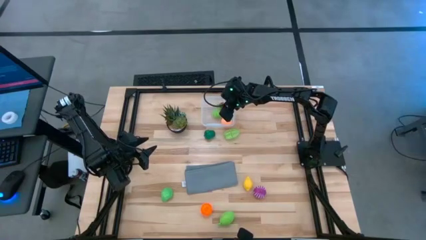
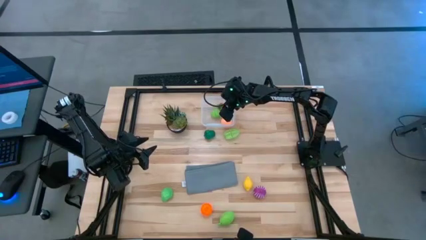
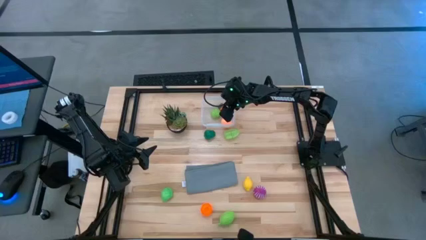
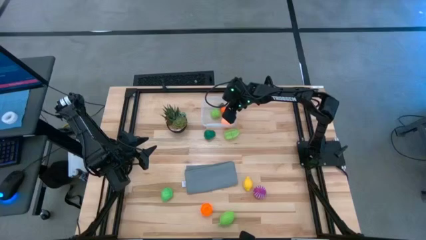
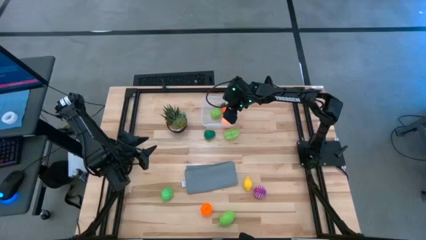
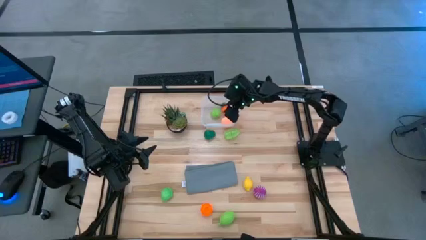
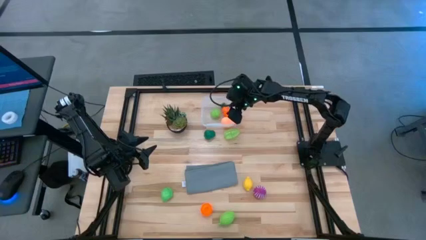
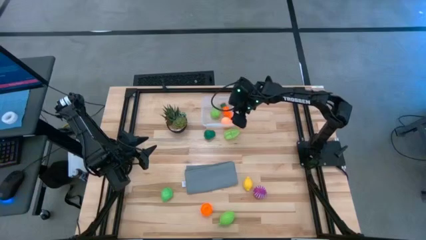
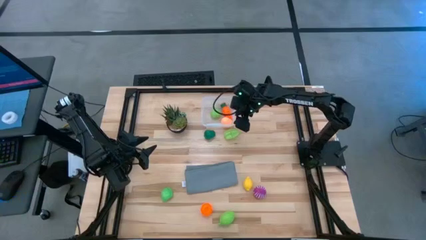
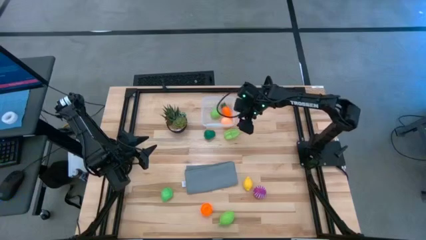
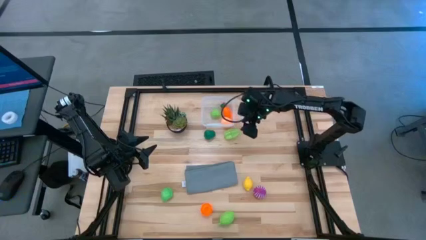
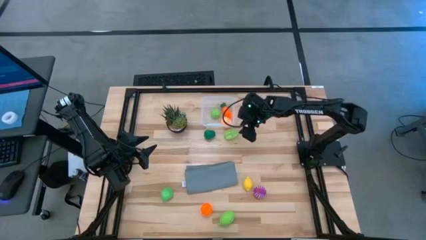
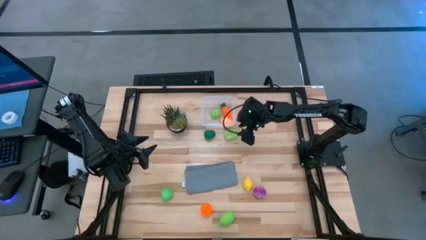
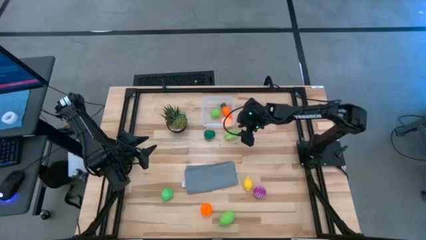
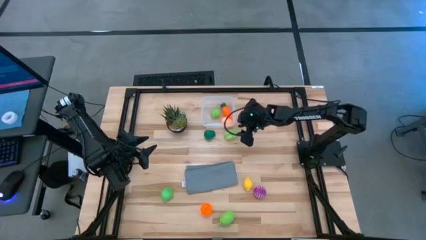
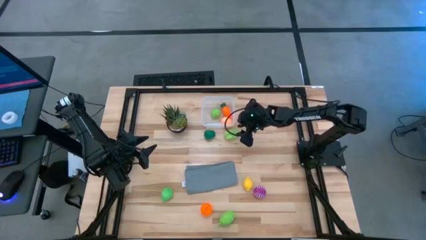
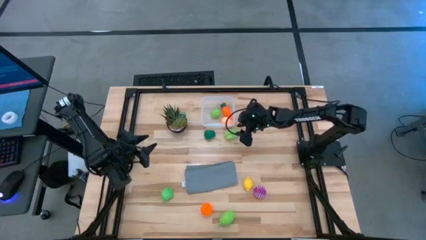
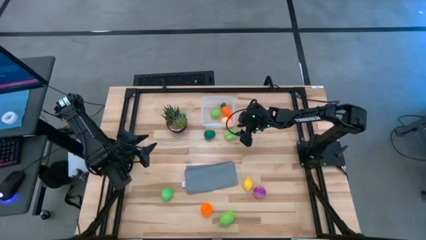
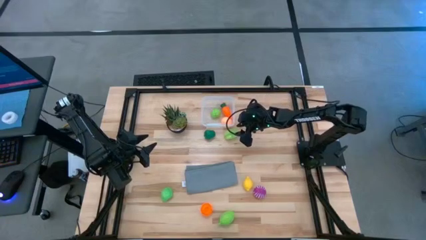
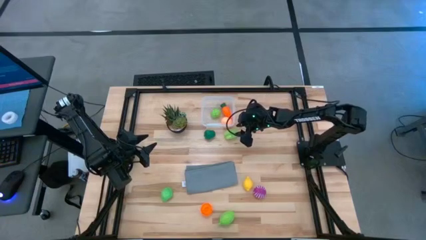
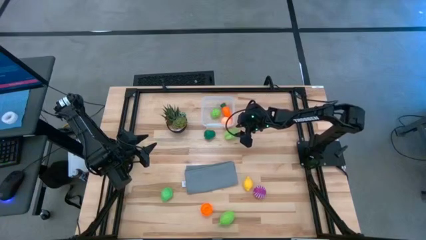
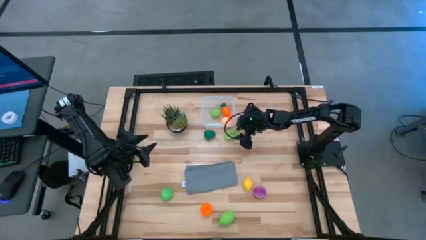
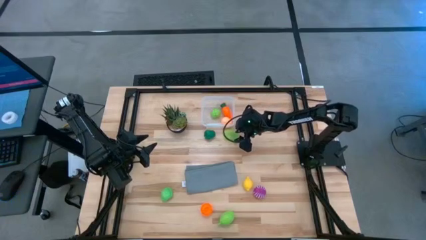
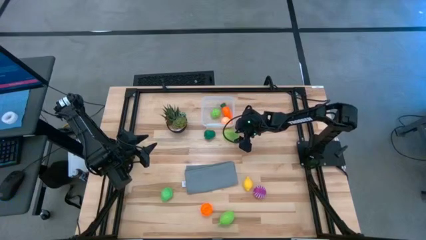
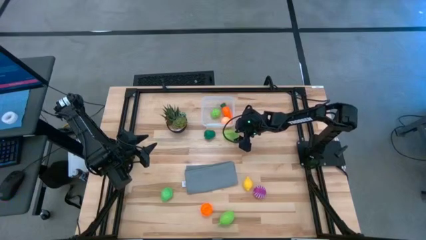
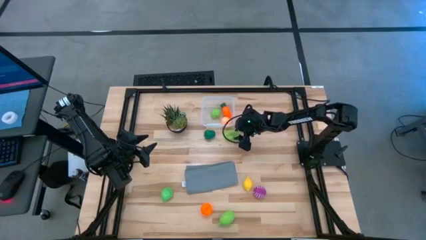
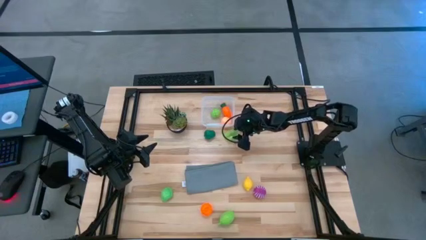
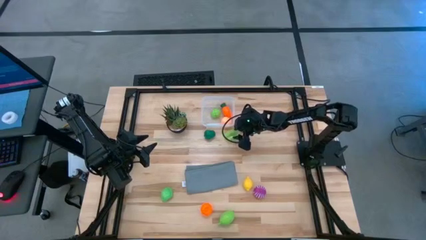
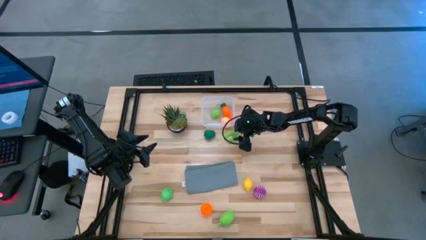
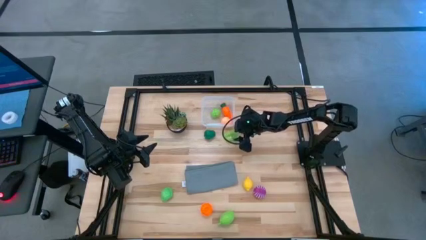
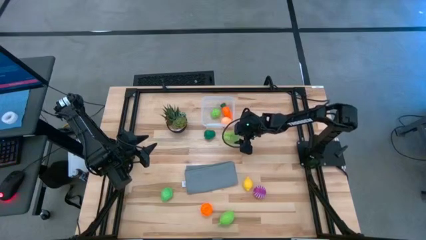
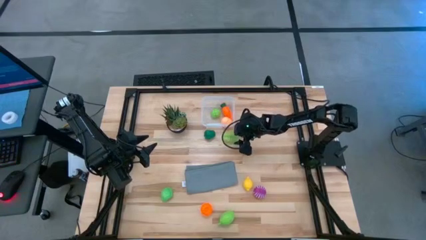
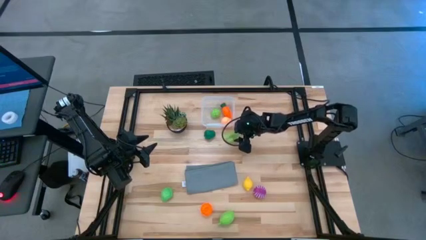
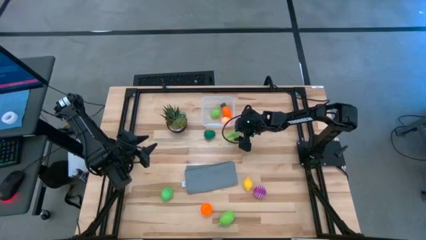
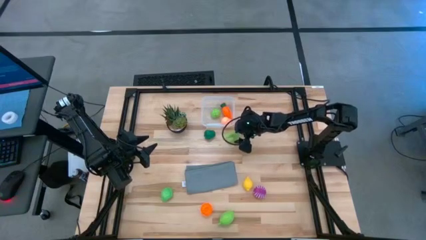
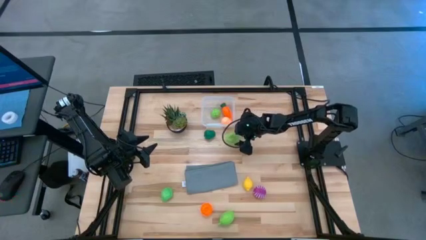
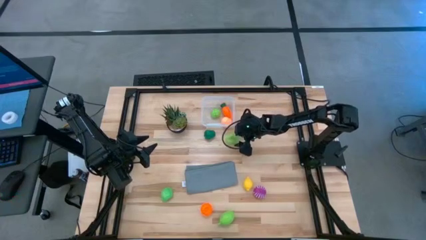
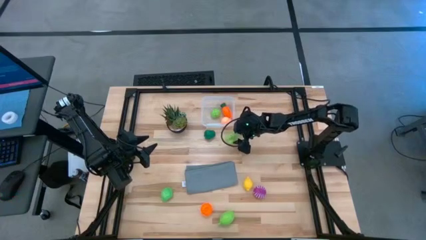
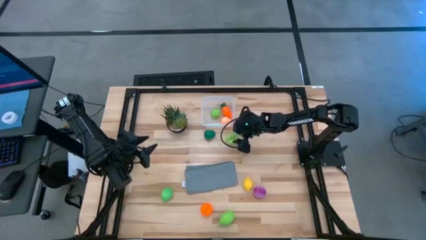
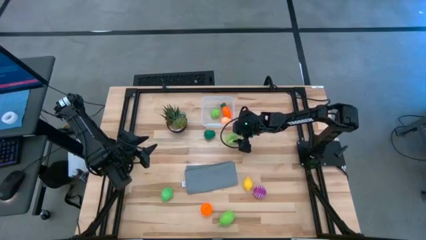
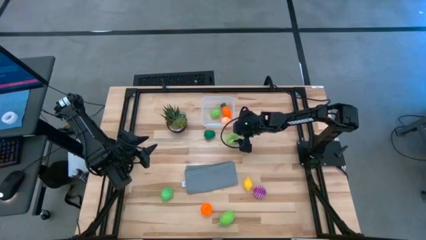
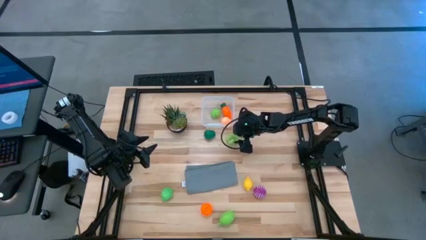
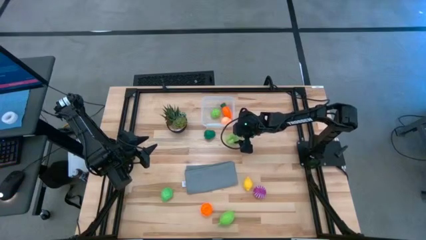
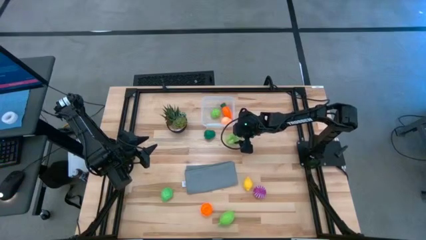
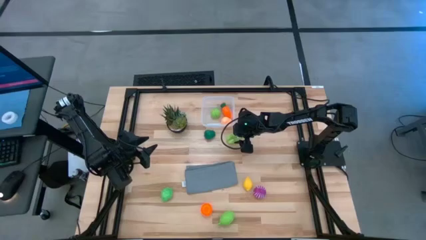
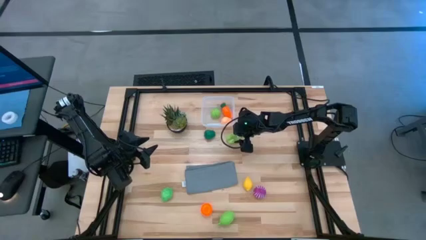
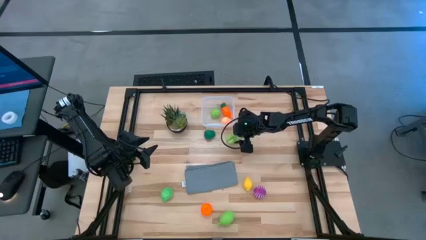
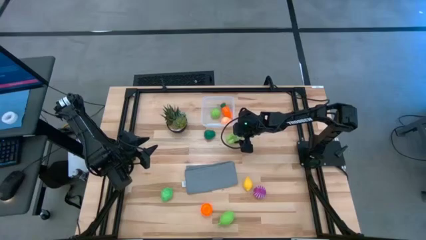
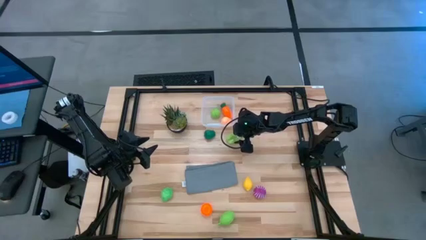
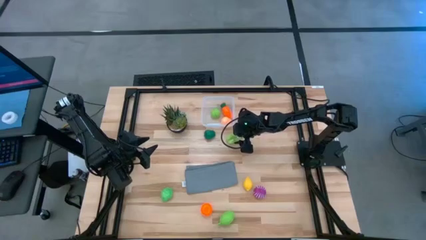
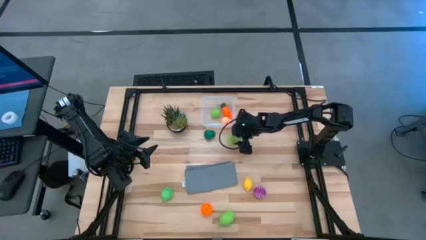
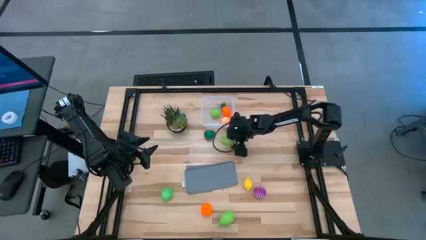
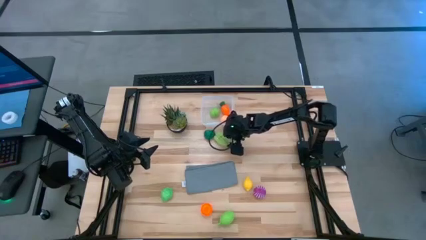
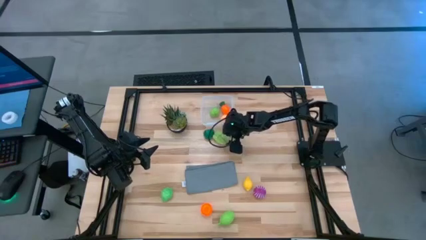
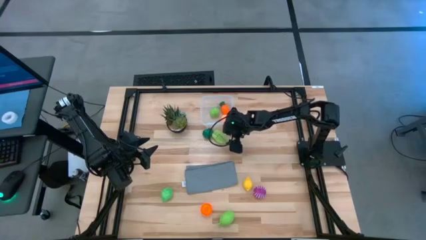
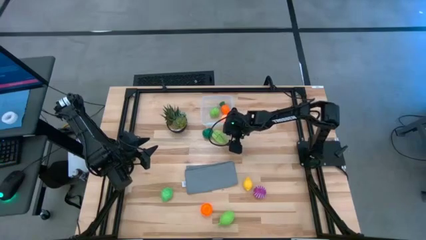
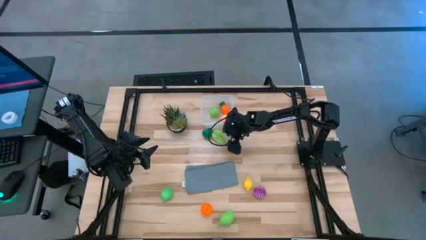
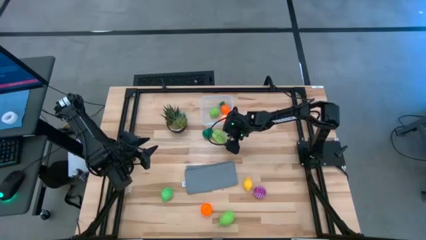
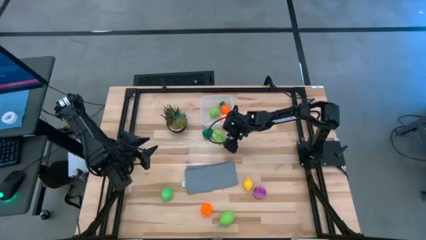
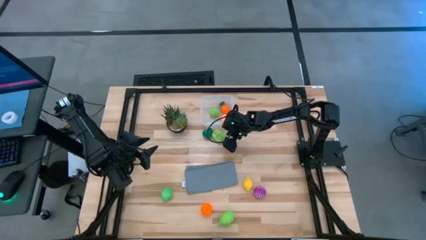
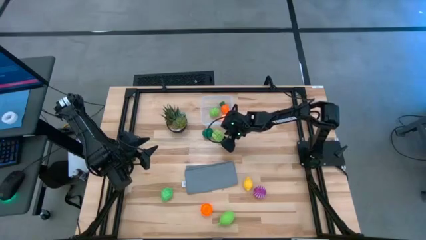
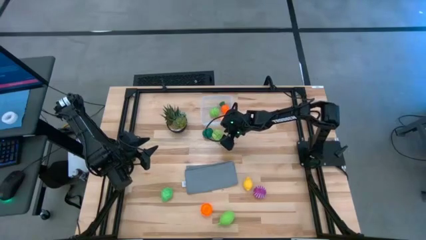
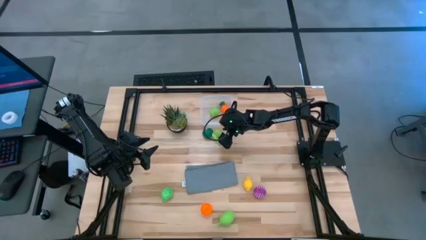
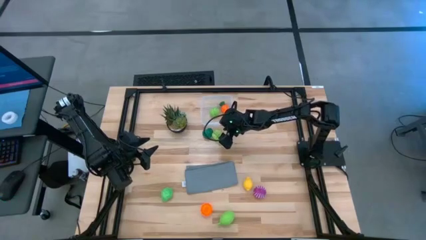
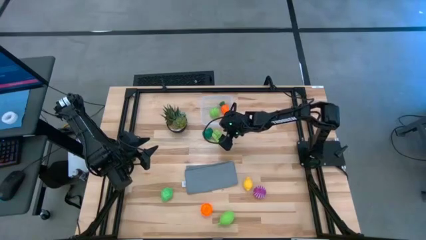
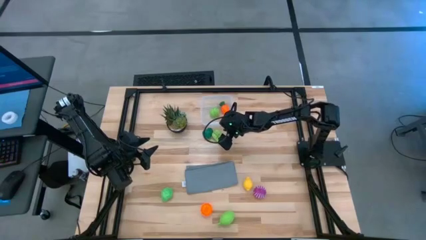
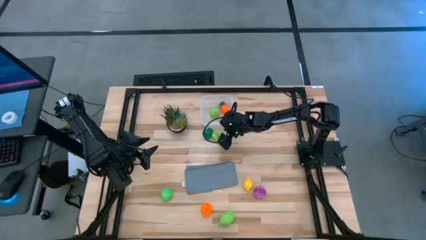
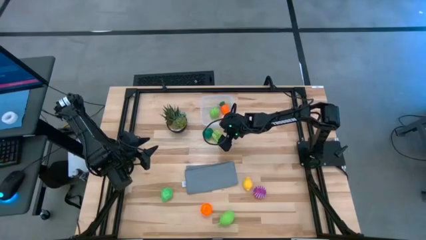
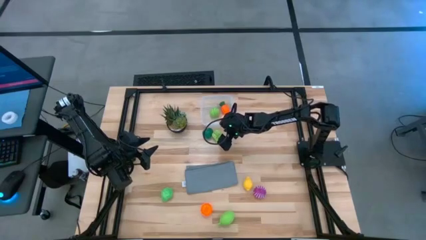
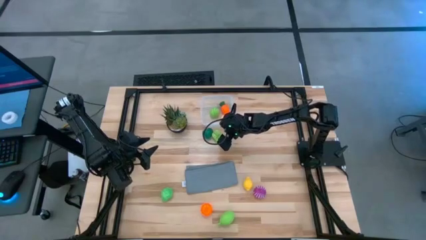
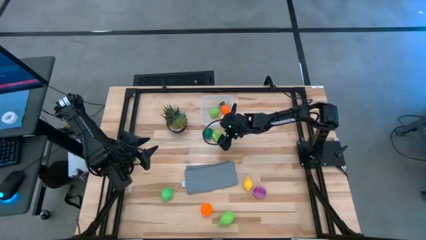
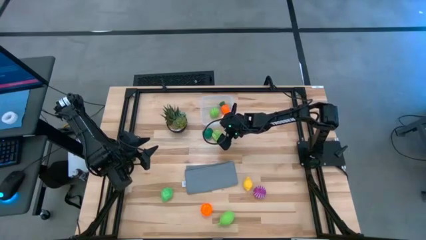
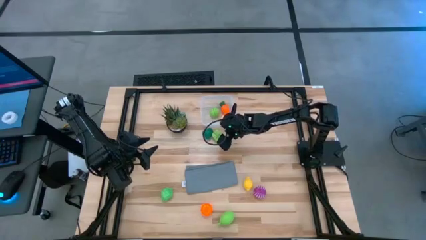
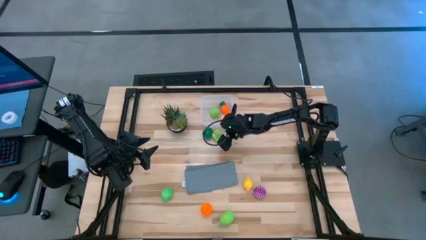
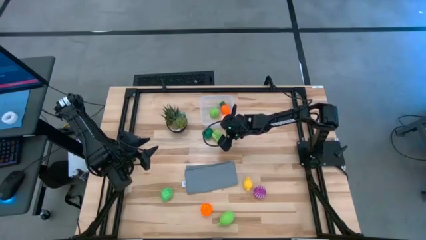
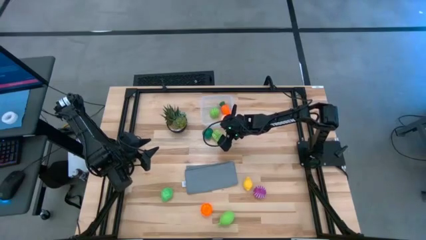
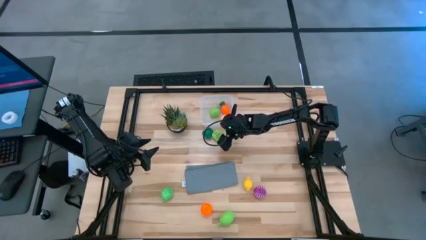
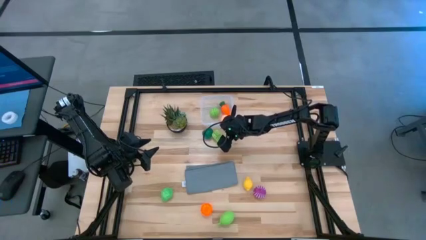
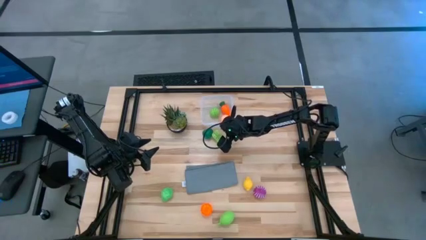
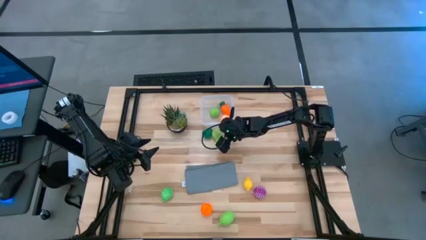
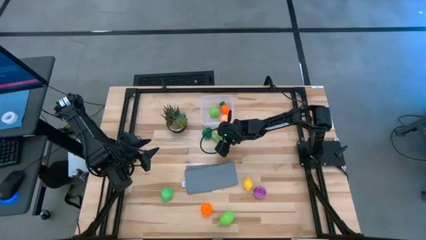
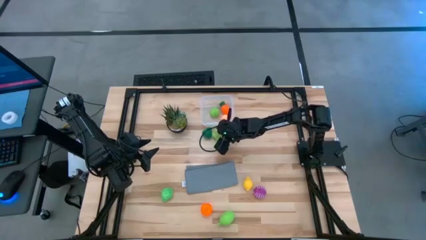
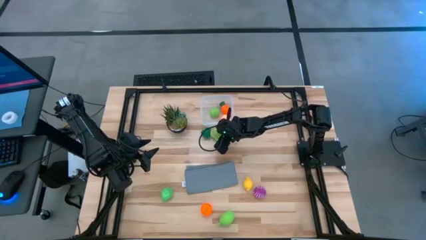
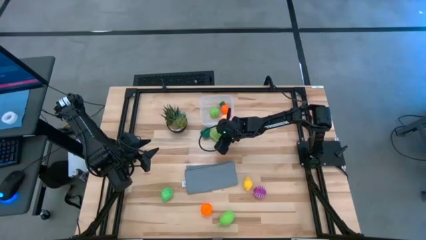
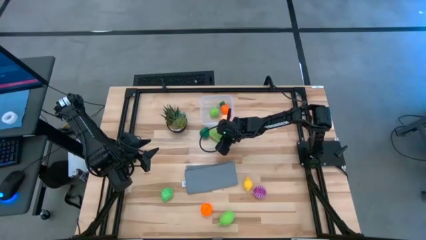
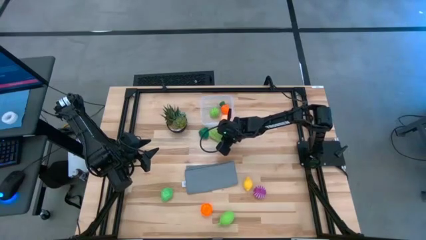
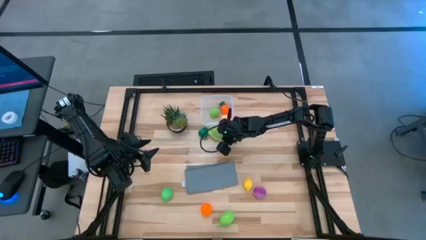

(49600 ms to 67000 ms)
Task: Pick and placing Produce into tupperware
Put the starfruit into the bin
